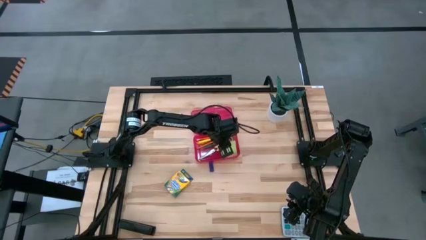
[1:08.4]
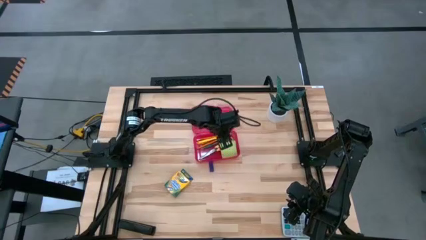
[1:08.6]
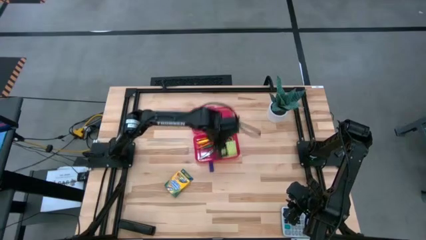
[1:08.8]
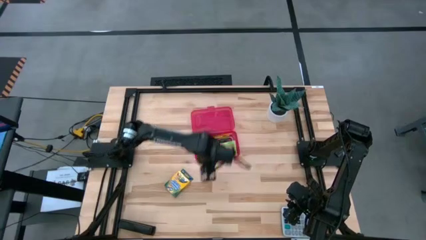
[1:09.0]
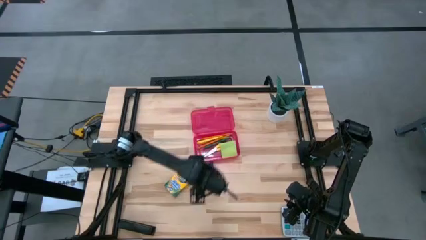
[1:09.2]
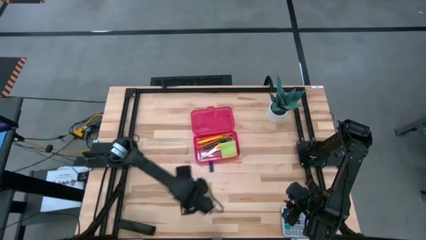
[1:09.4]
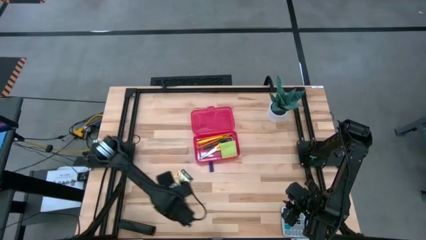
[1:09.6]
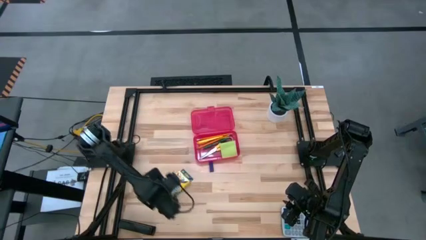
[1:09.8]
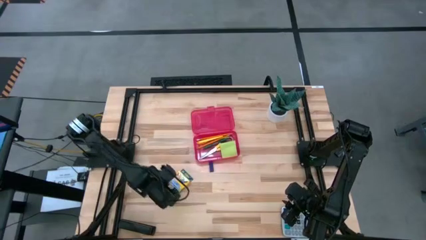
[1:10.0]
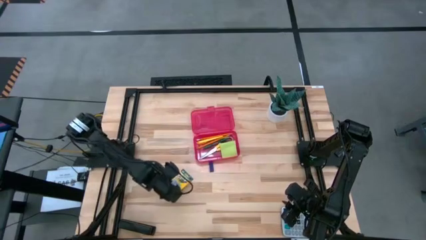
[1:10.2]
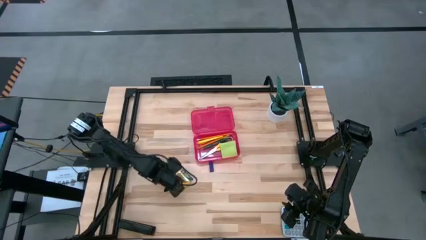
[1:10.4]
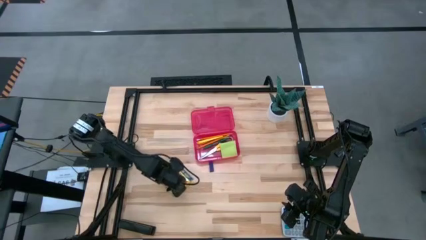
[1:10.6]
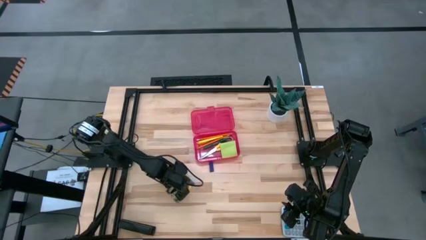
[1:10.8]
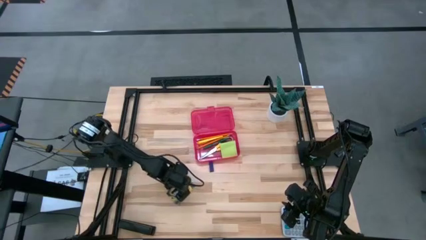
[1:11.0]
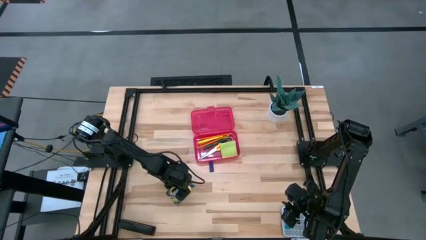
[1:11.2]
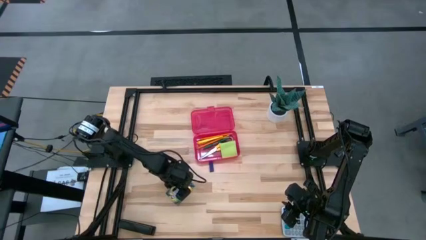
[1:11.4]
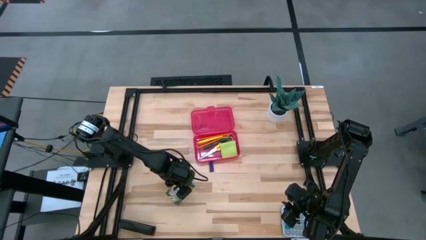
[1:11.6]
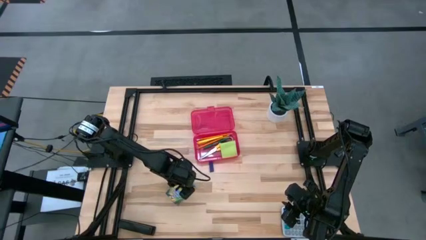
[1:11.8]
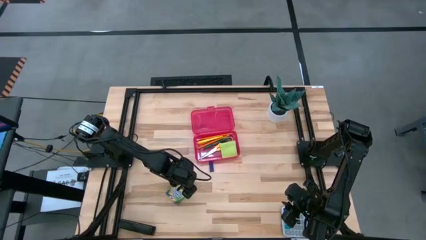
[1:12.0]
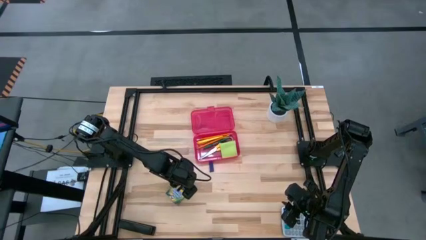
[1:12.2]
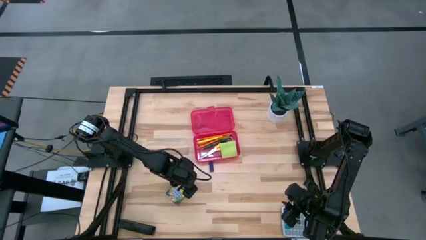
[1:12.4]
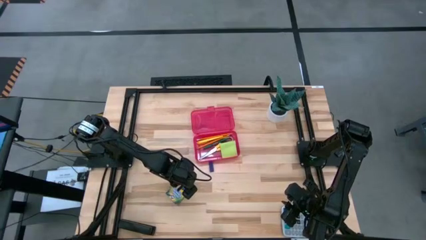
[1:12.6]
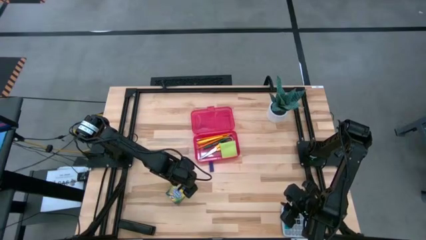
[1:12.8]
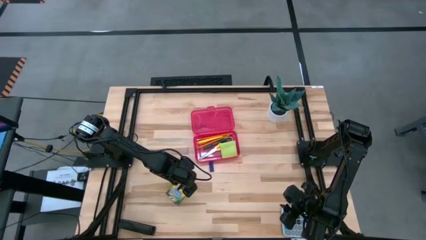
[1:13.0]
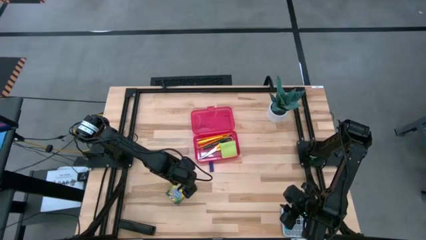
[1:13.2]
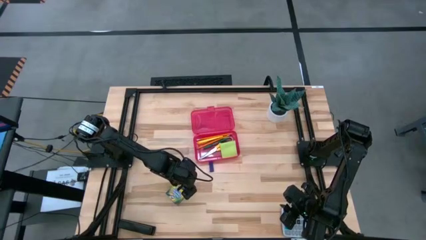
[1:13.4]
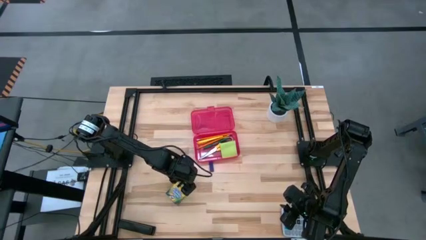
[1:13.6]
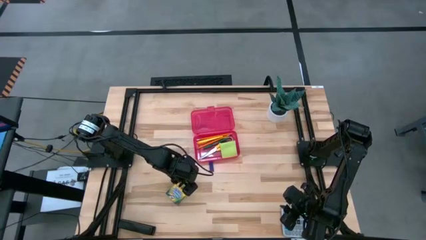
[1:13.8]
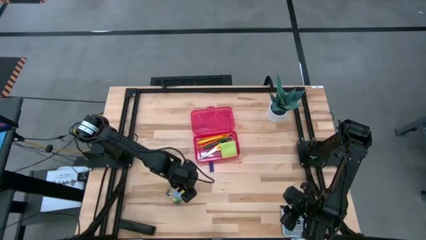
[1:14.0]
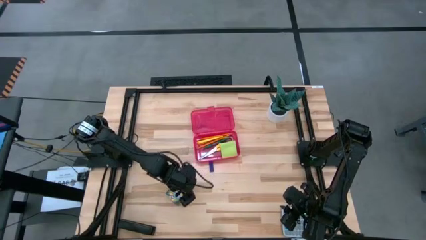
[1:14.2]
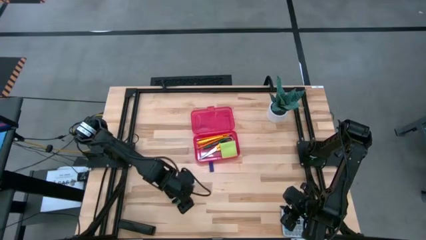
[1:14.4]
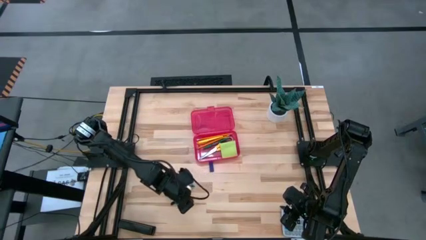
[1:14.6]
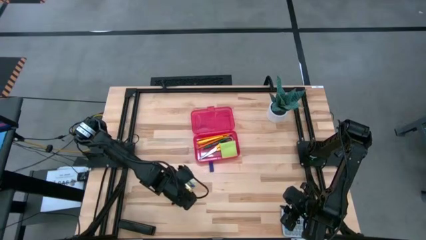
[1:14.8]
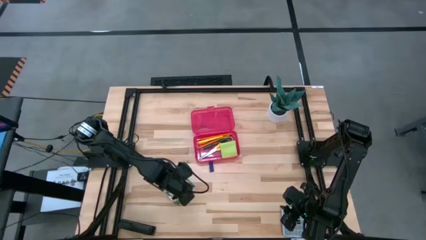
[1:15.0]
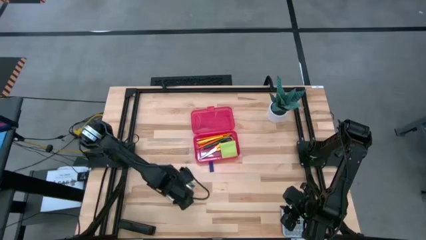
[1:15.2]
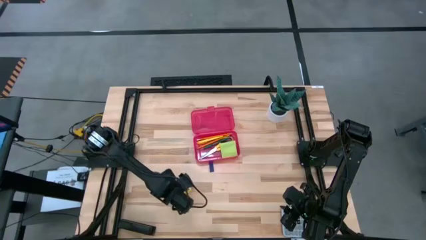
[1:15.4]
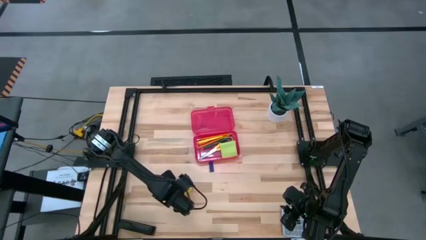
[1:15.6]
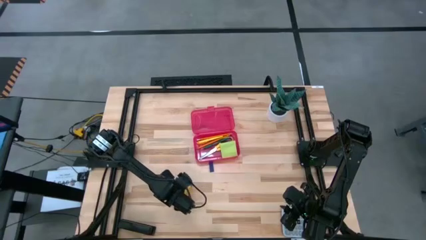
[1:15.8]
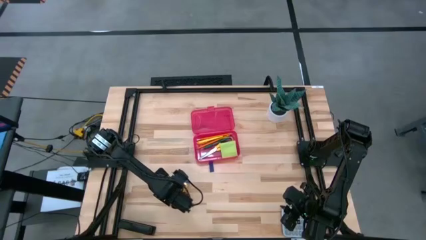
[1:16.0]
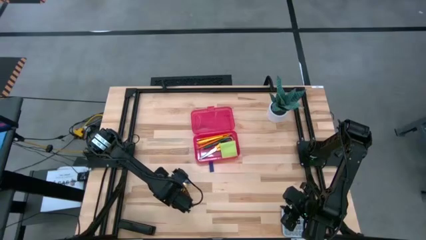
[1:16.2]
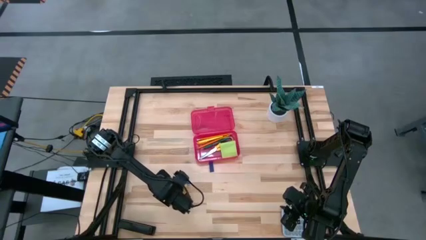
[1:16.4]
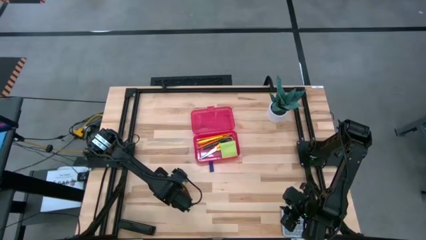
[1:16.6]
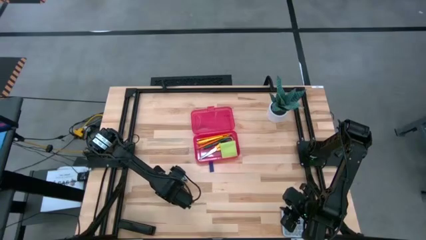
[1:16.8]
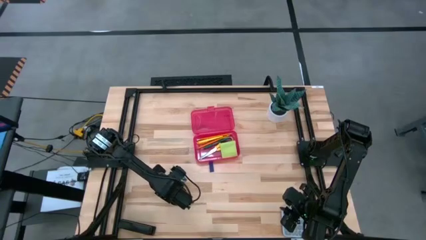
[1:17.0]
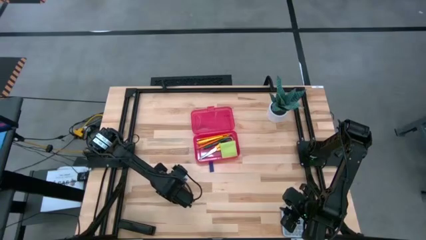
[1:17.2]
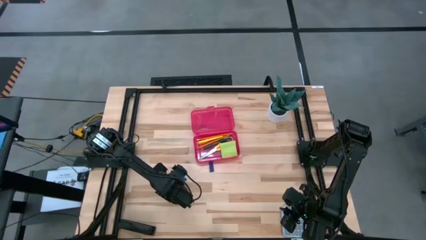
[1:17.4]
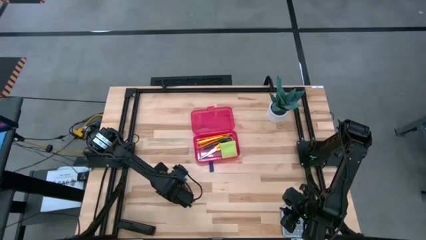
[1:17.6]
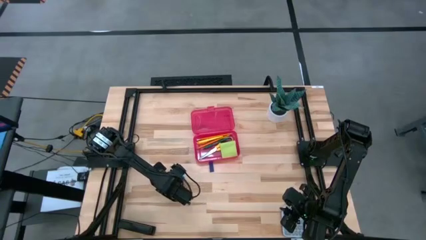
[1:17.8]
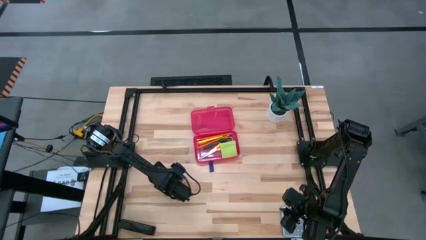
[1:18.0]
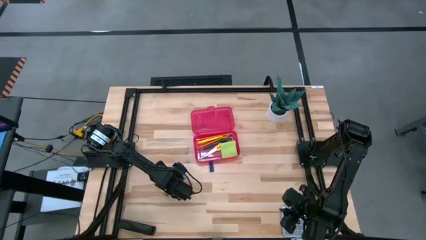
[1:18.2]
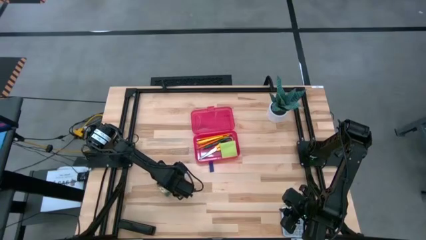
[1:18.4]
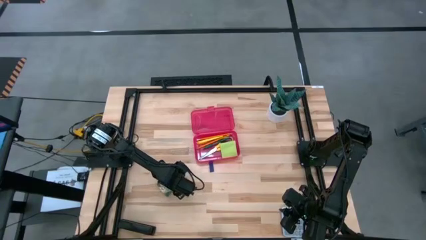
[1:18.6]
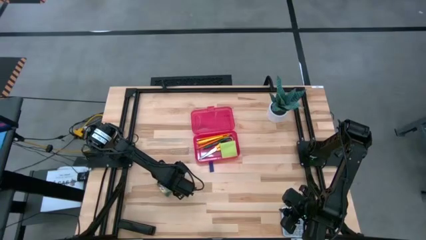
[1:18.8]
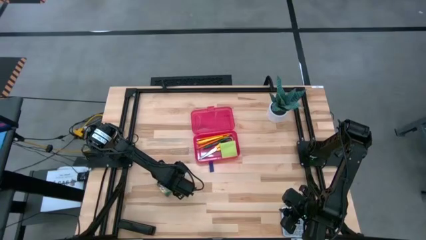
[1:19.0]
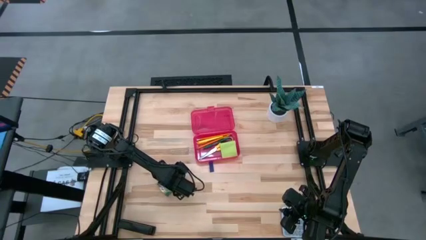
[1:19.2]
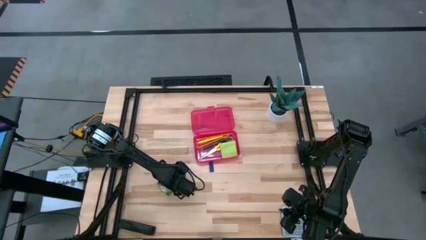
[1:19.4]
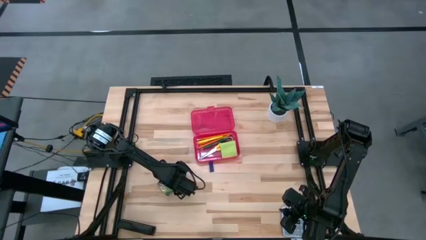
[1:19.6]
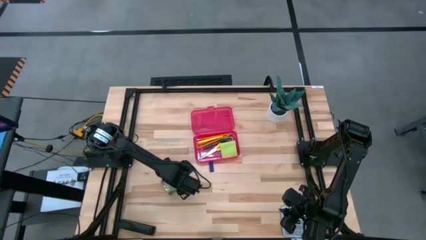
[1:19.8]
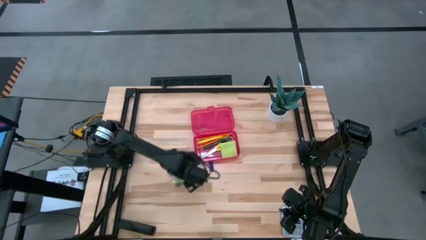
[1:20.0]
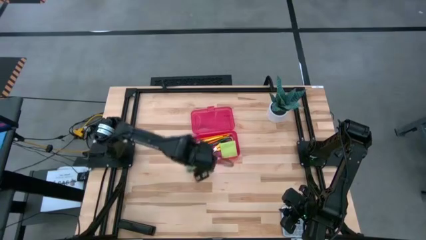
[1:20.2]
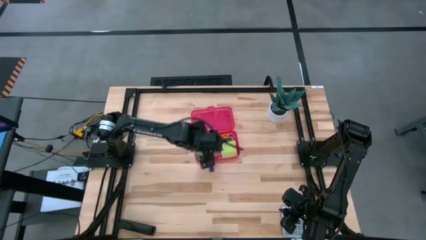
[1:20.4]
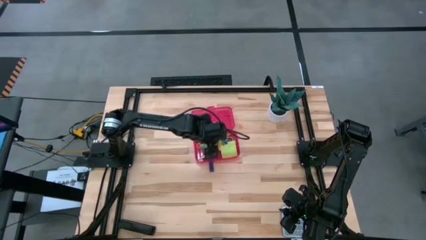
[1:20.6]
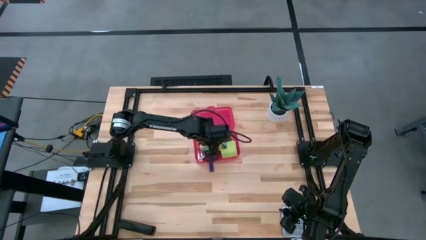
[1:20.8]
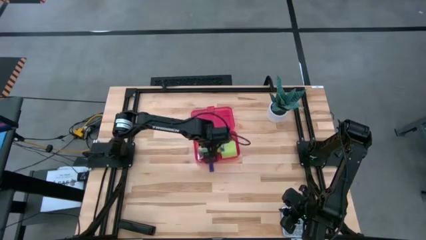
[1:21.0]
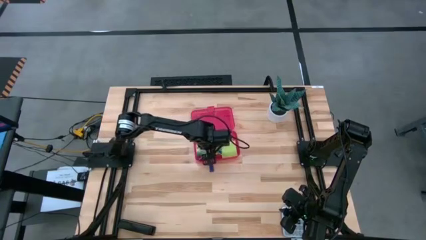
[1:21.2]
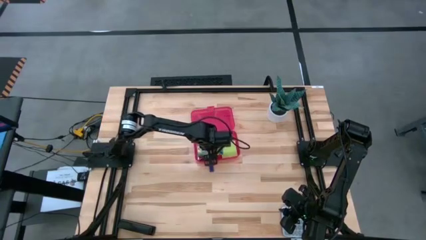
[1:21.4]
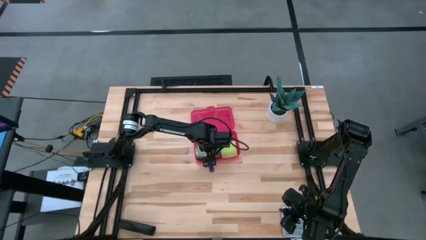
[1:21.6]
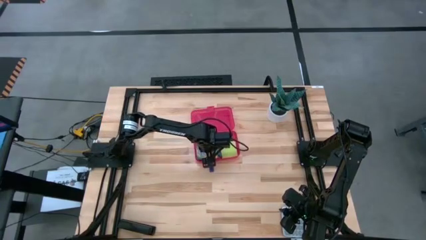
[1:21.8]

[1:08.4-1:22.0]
Task: Pack school essentials
Put the yellow crayon box into the supply box
